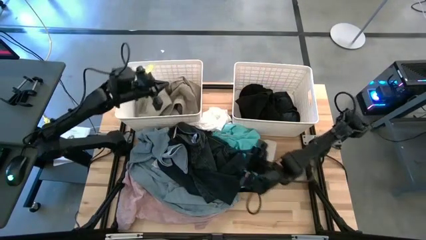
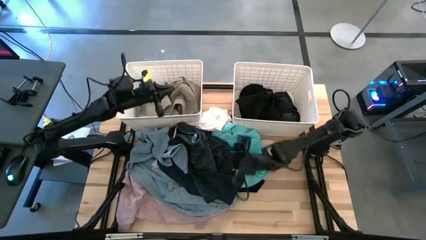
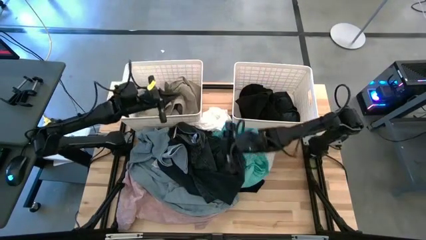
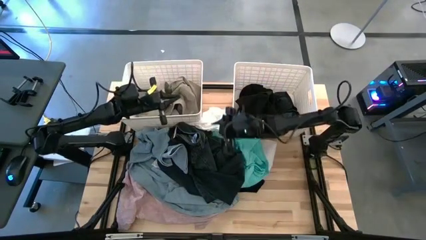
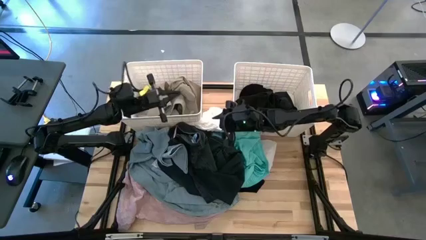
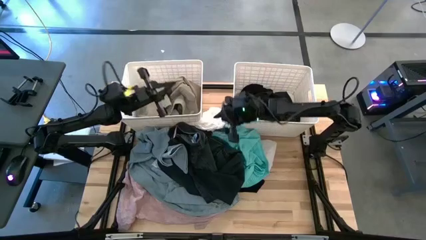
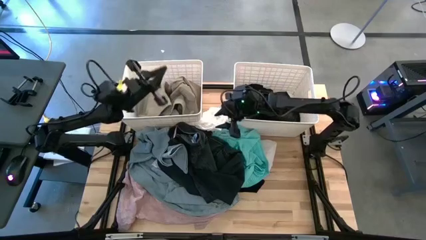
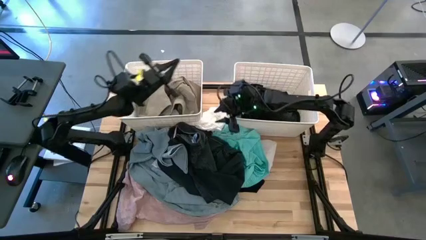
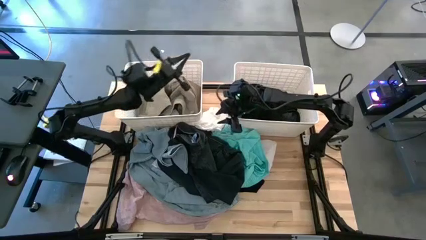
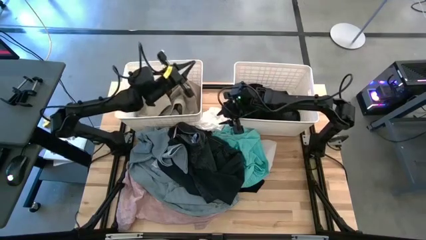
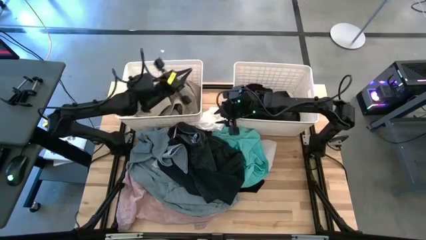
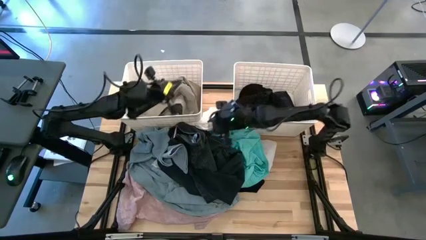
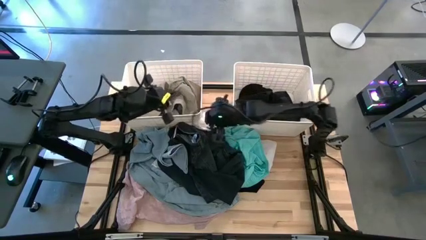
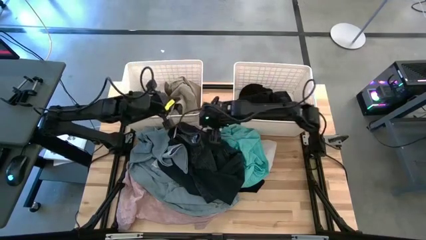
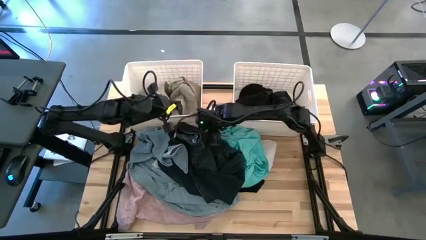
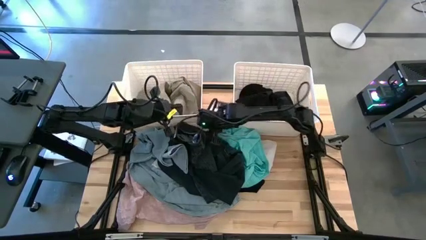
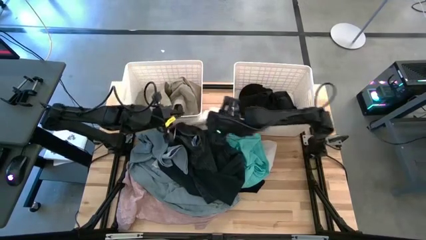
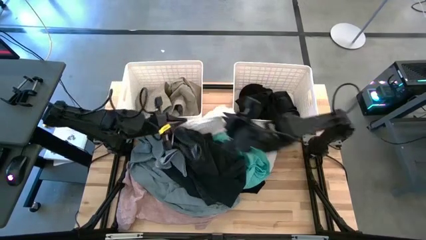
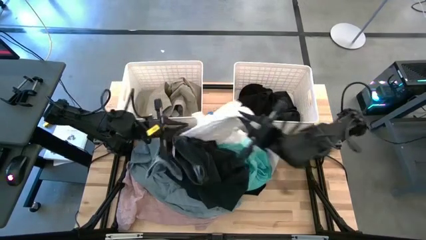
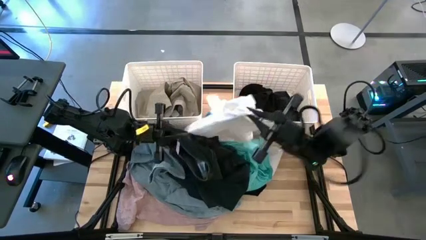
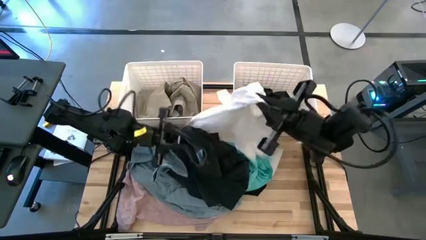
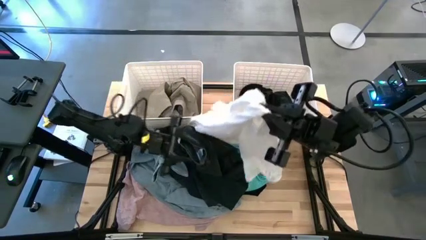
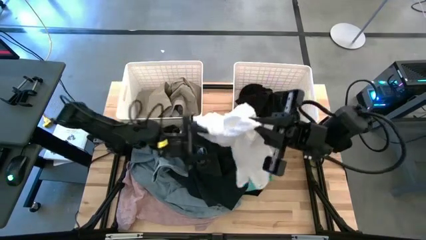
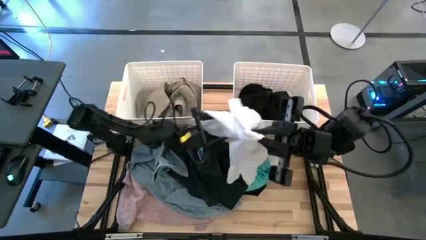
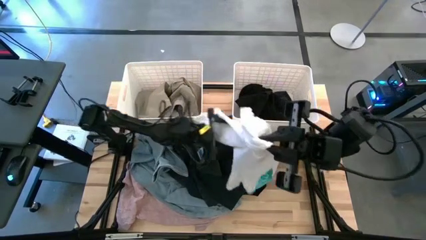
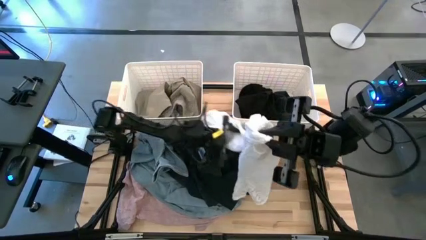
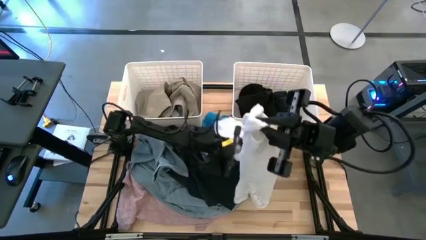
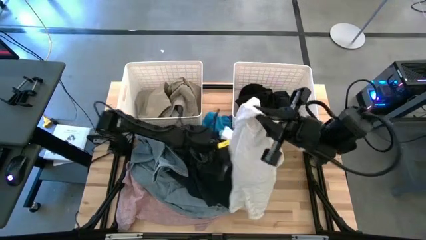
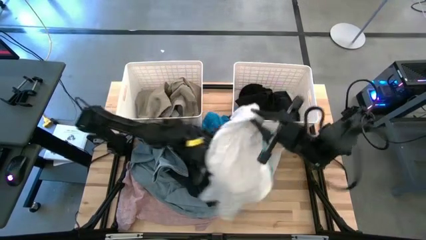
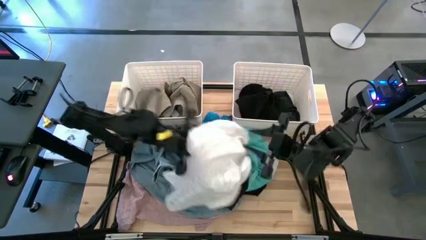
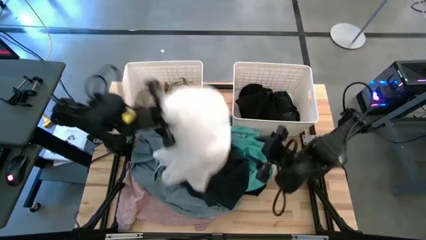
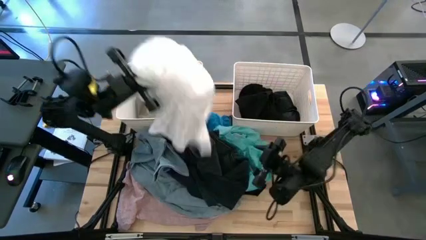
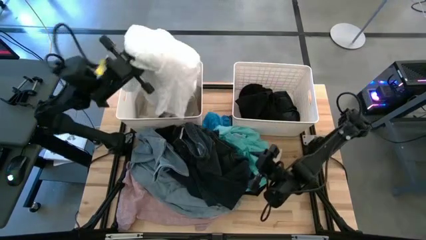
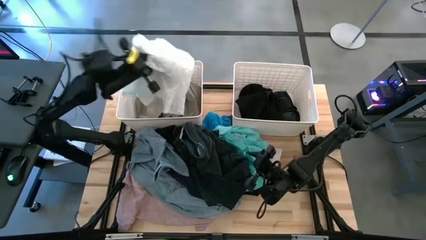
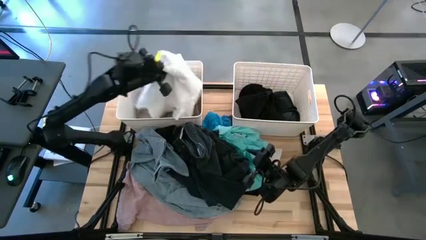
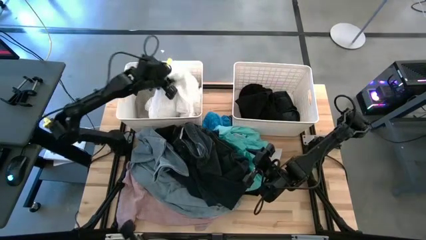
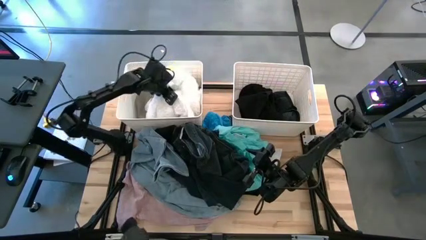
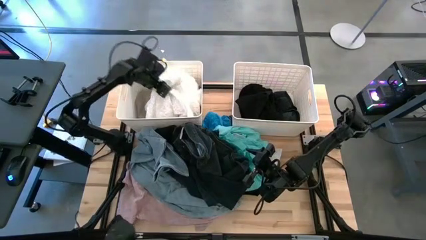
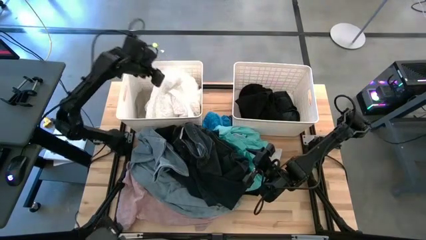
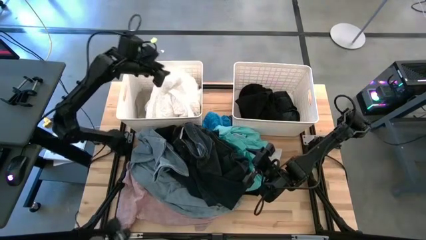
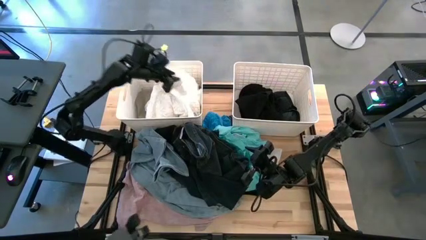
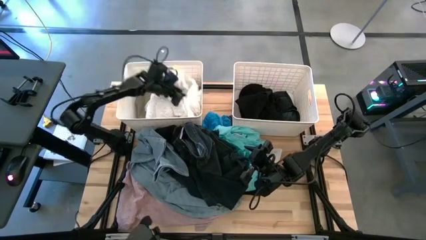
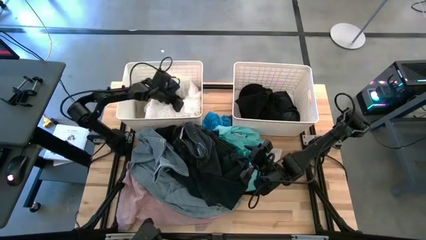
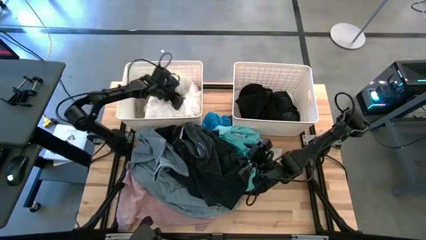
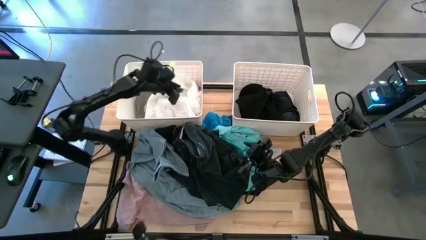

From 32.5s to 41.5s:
Task: Sort clothes
Put the white dress into the left white bin

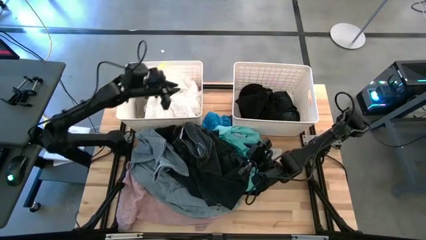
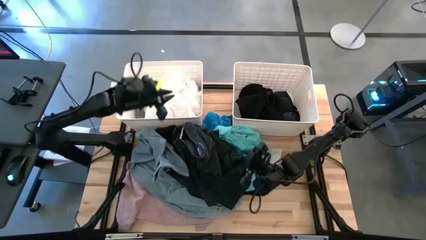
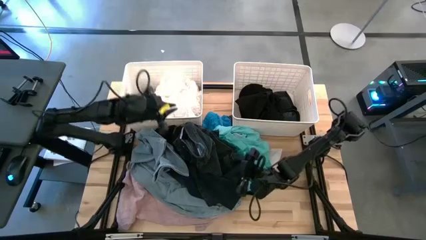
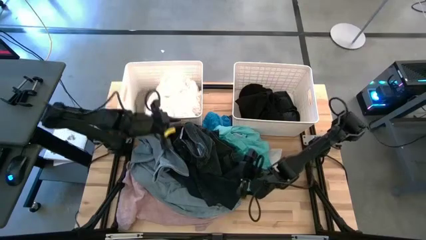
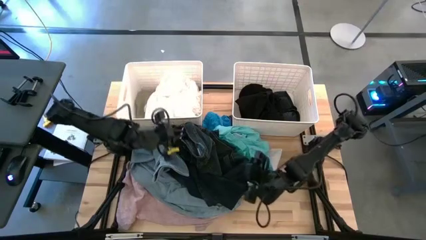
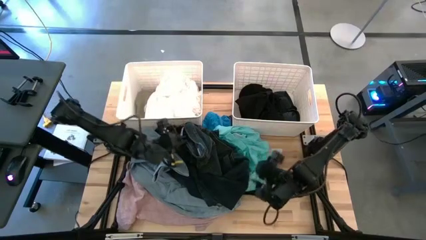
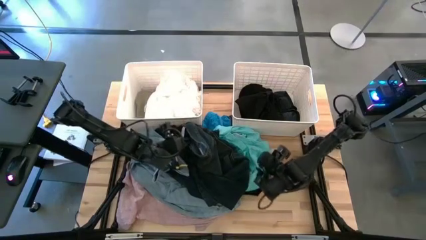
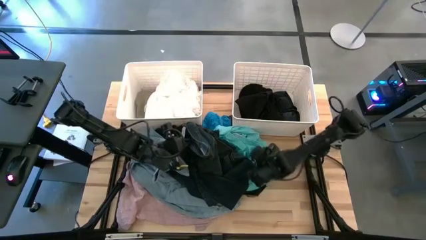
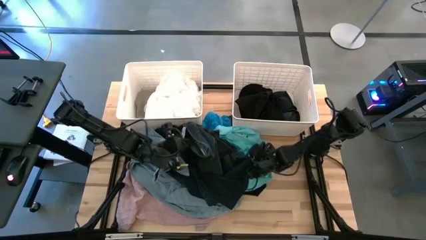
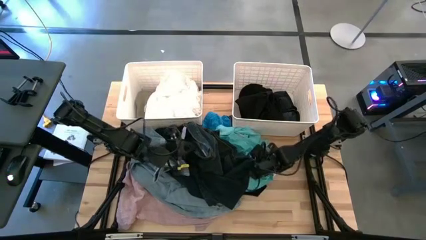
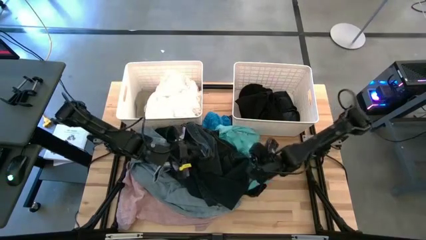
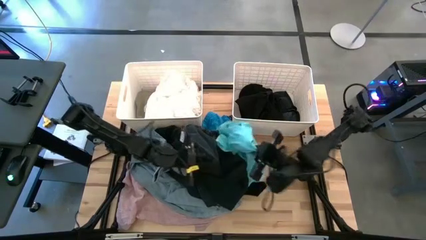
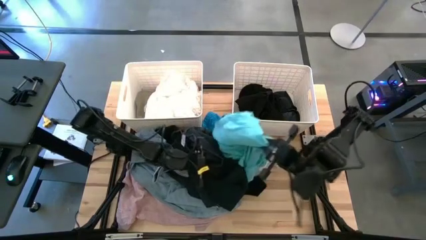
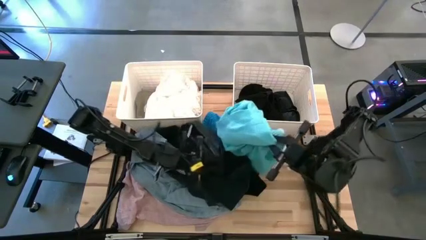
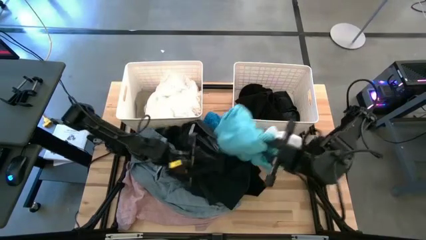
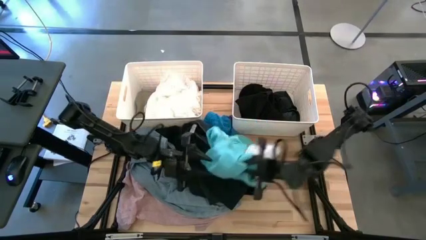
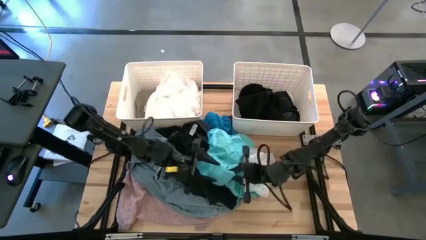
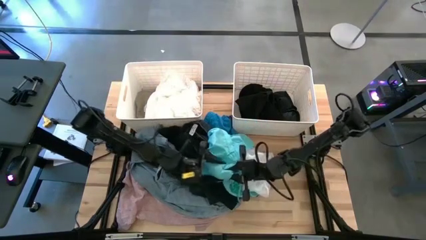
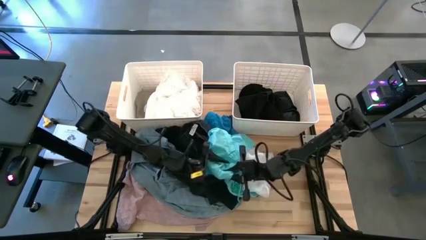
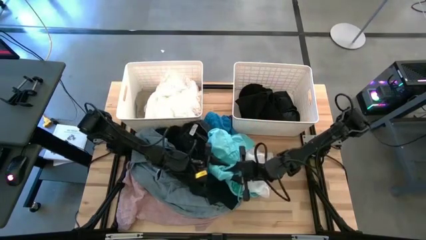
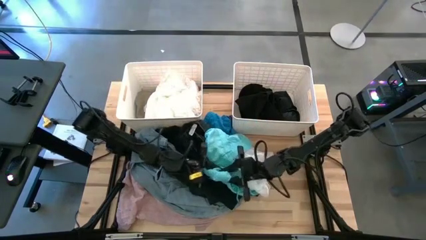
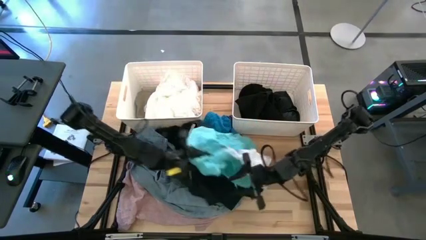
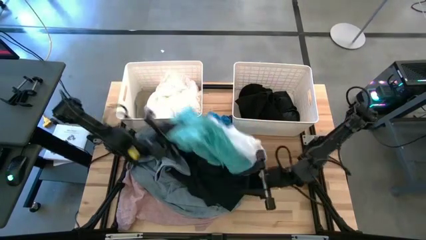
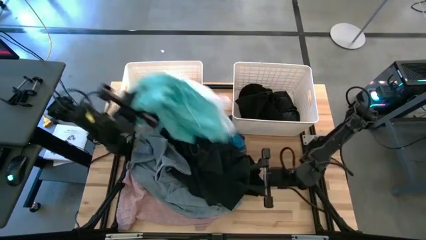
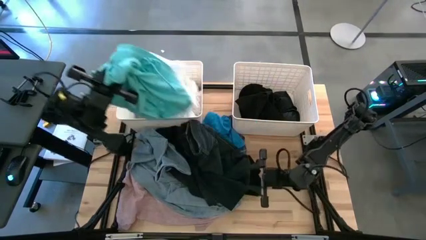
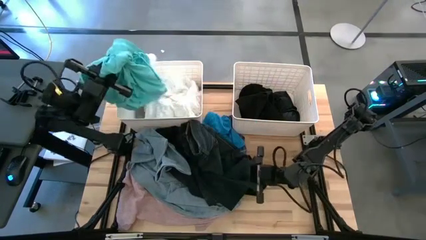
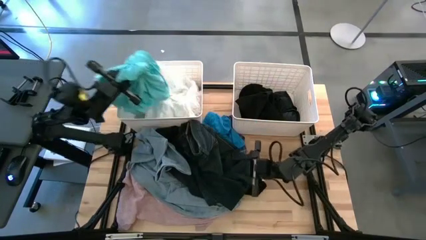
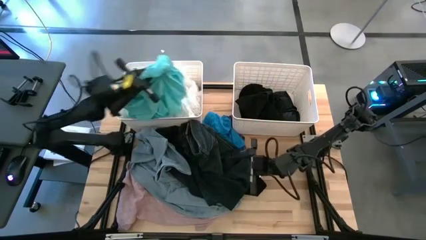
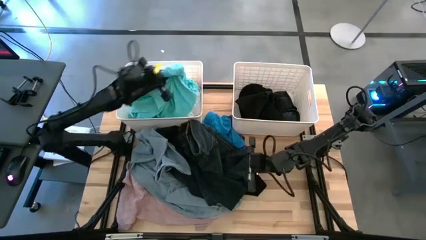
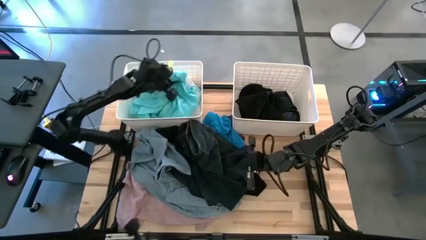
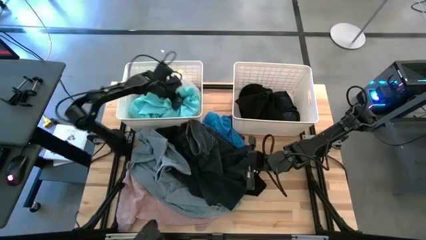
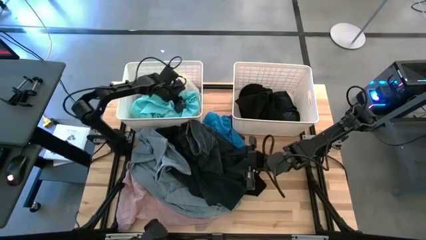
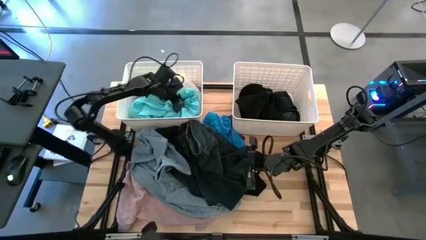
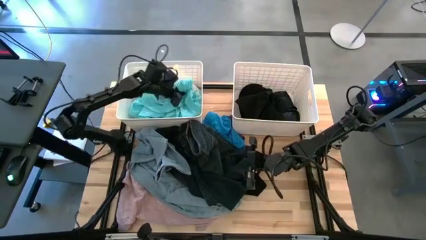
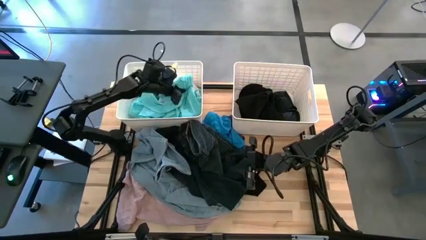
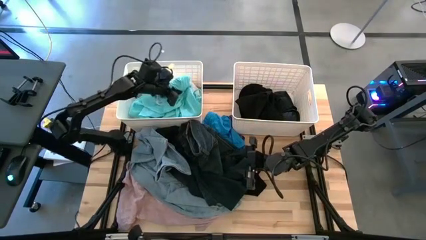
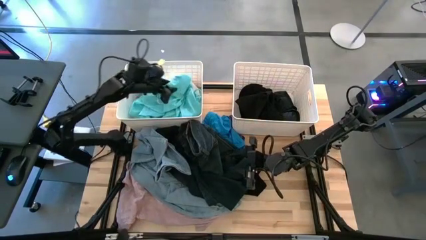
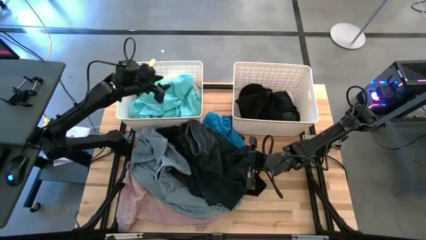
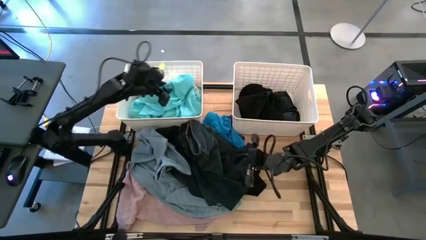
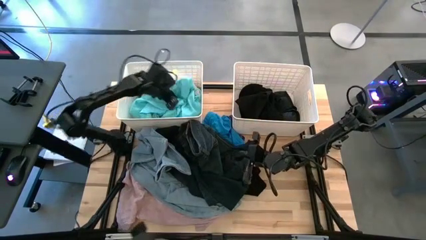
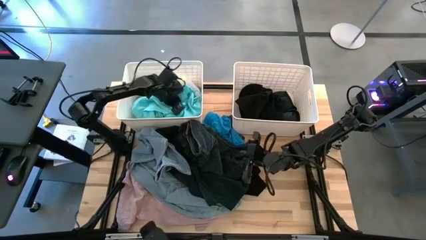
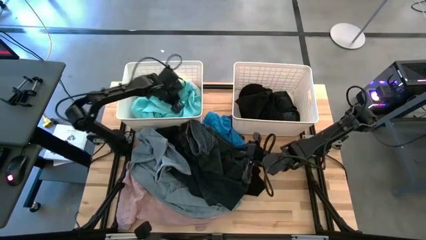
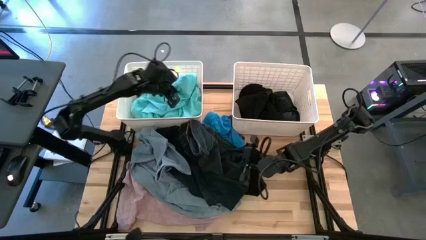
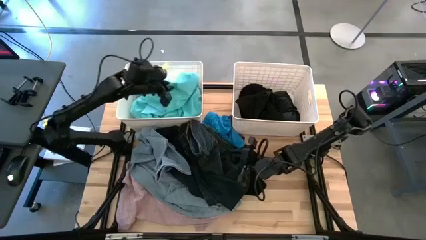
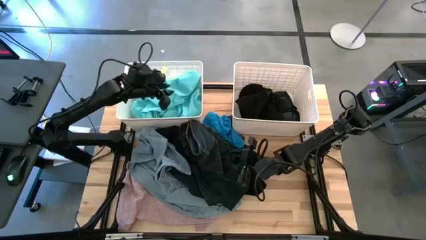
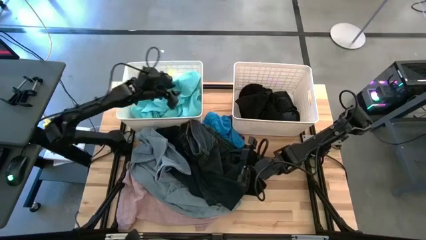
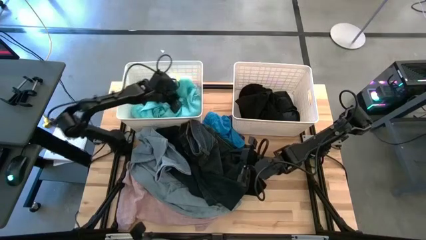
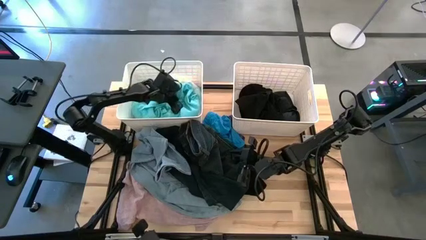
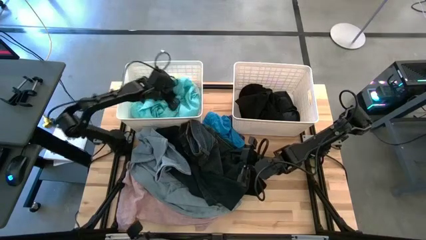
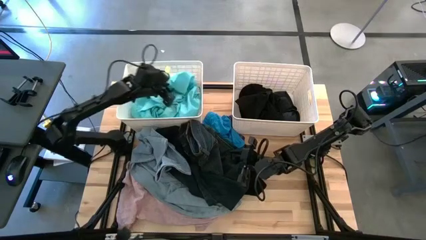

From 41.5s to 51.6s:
Put the light blue shorts into the left white bin
